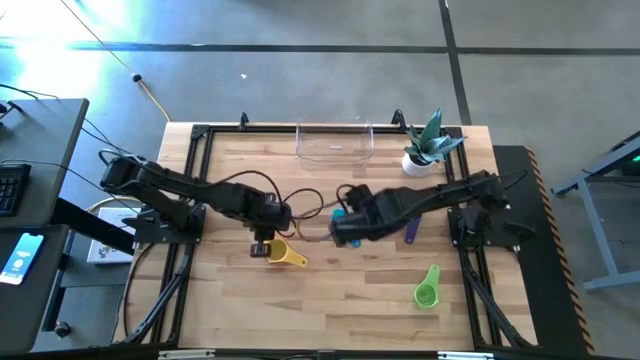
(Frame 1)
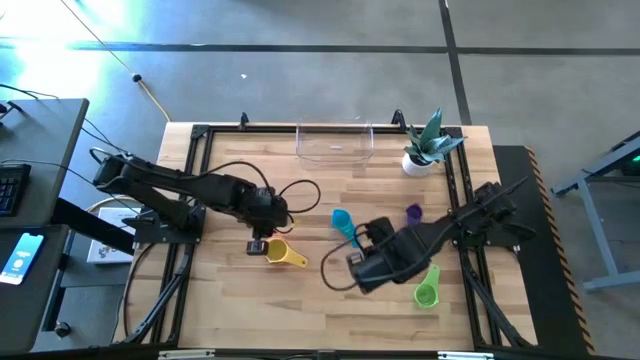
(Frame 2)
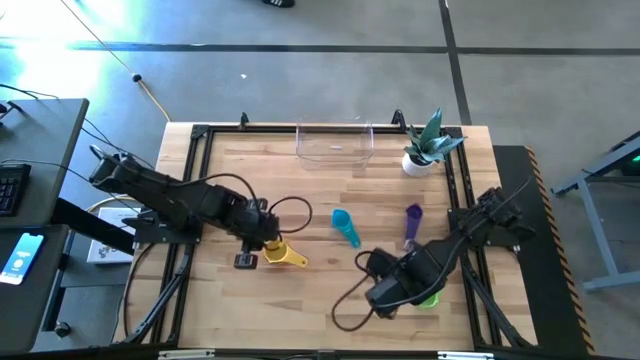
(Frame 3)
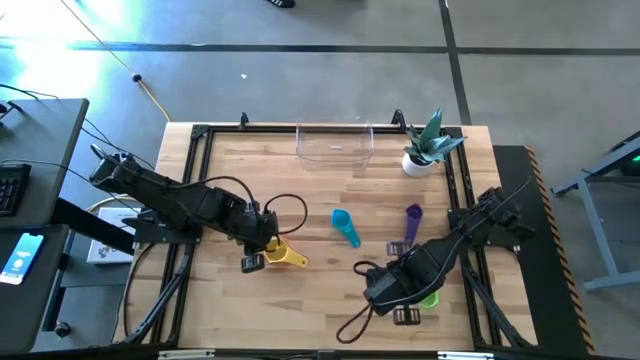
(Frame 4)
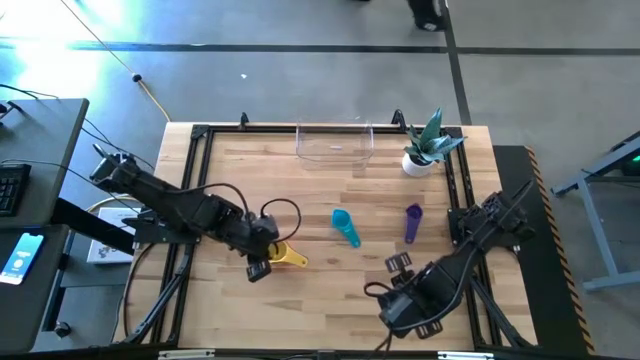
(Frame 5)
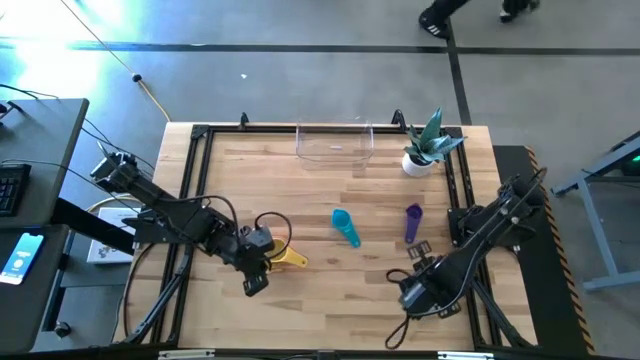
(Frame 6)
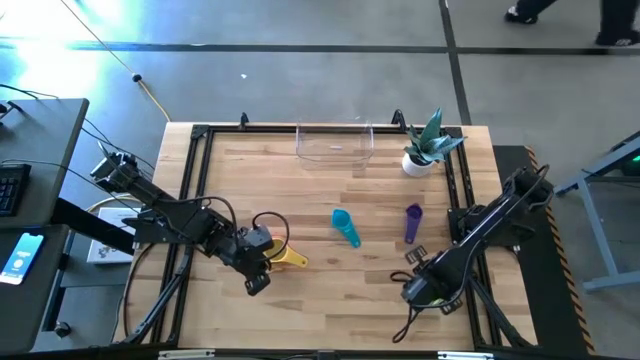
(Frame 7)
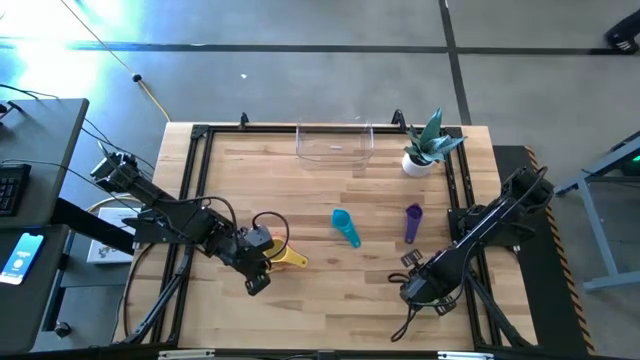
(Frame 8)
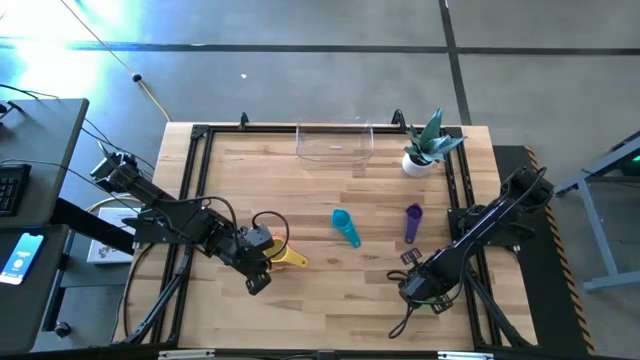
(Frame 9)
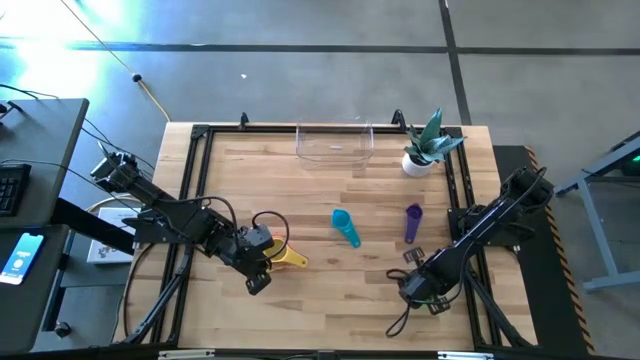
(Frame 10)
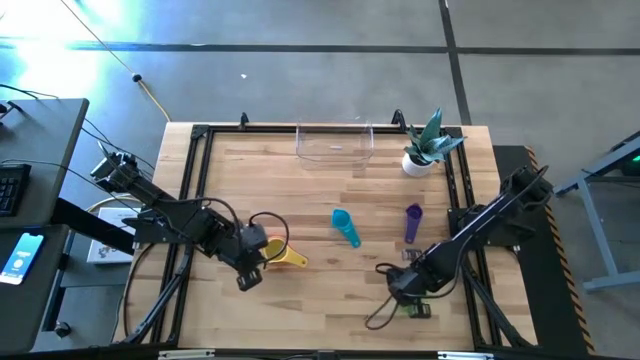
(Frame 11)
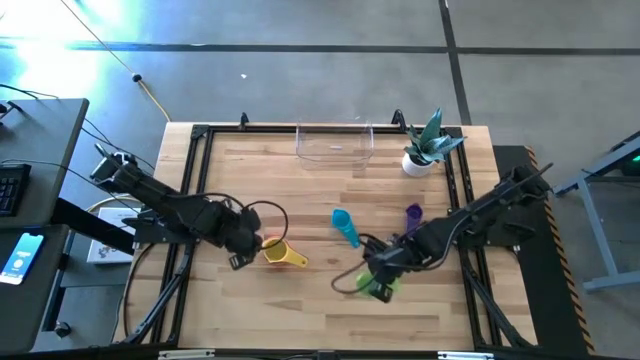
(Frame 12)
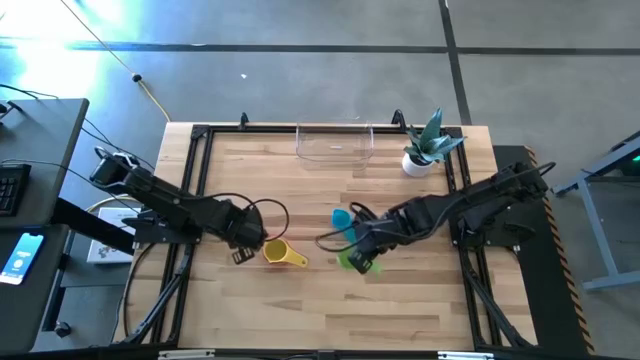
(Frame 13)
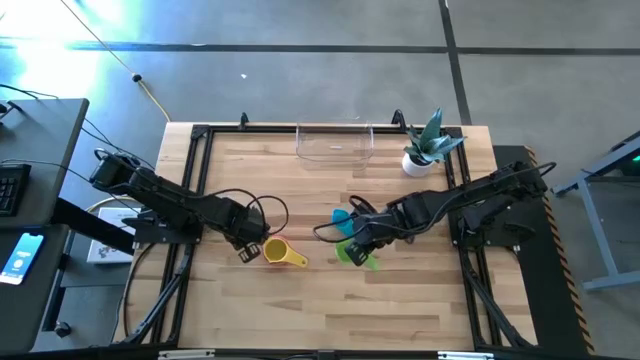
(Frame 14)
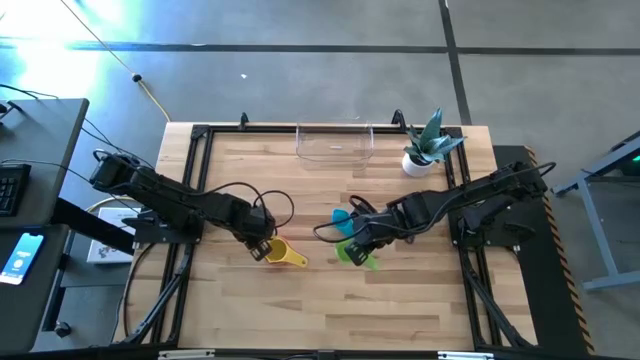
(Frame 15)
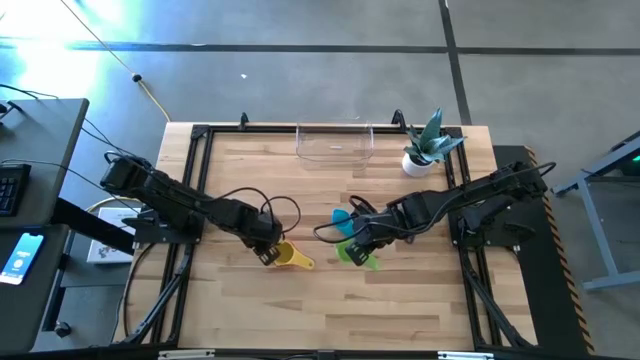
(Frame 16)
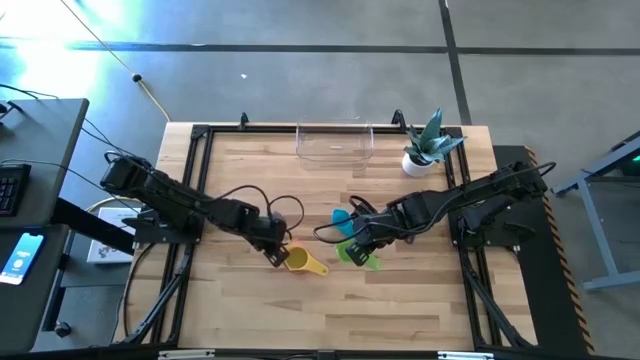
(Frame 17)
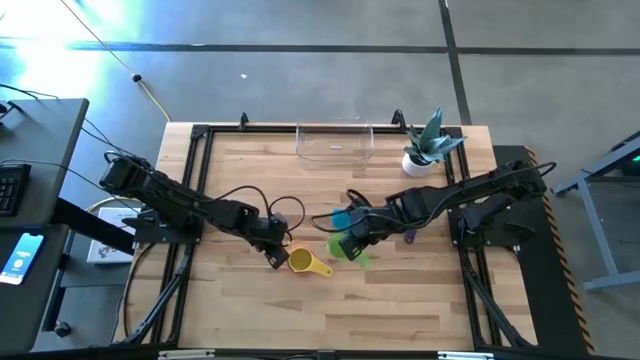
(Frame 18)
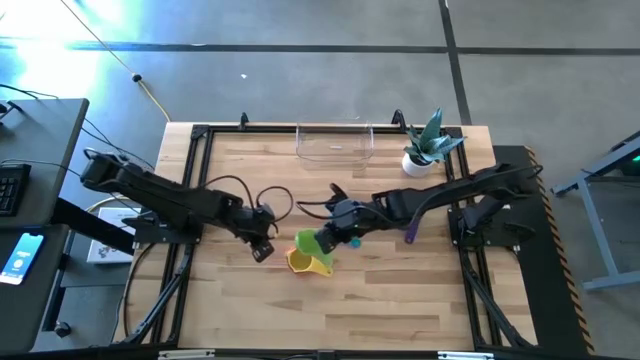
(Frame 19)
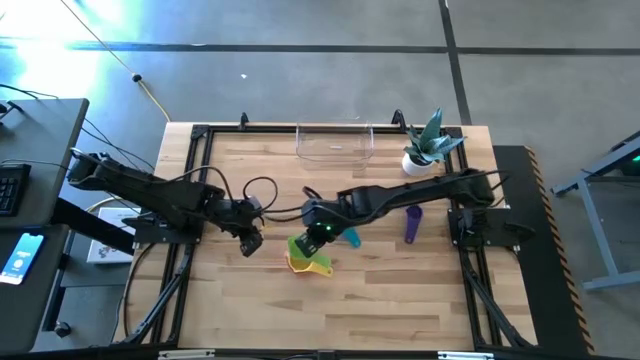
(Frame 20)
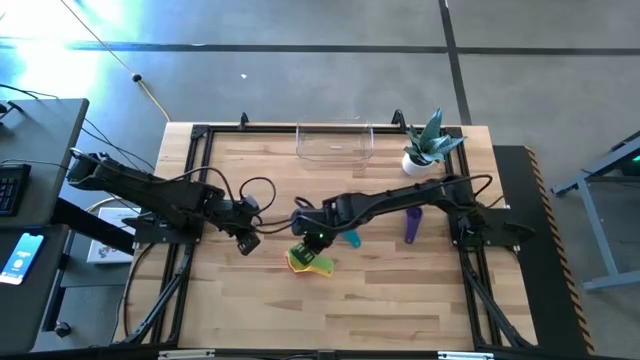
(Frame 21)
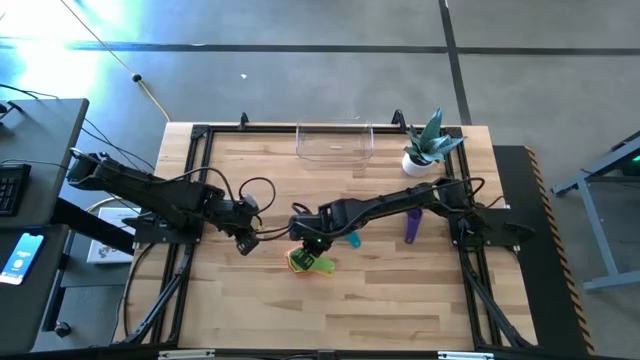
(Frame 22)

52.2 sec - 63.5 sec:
Task: Nest measuring cups in basket
Stack the green measuring cup on top of the yellow measuring cup

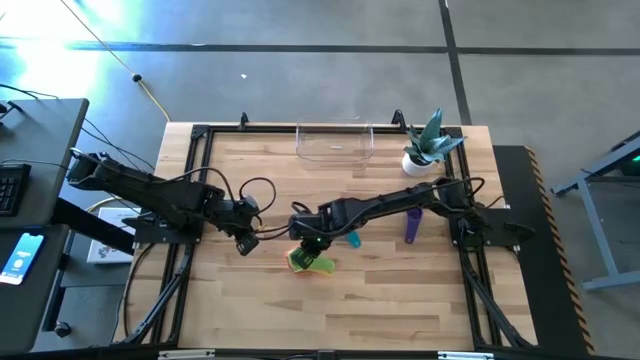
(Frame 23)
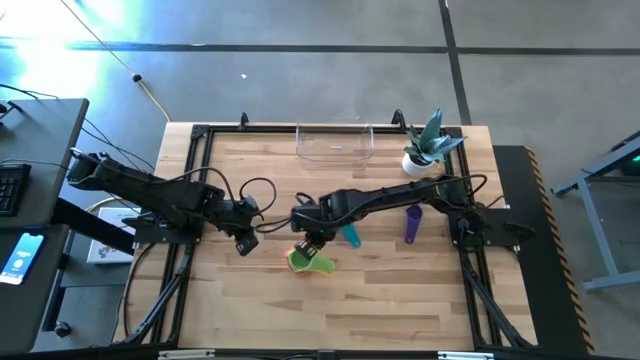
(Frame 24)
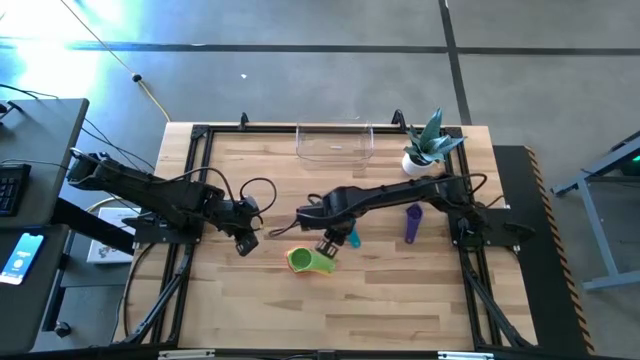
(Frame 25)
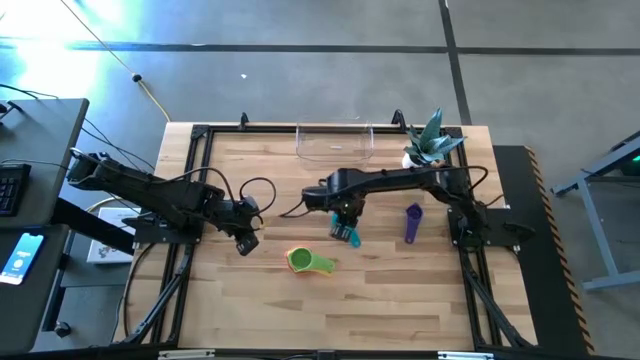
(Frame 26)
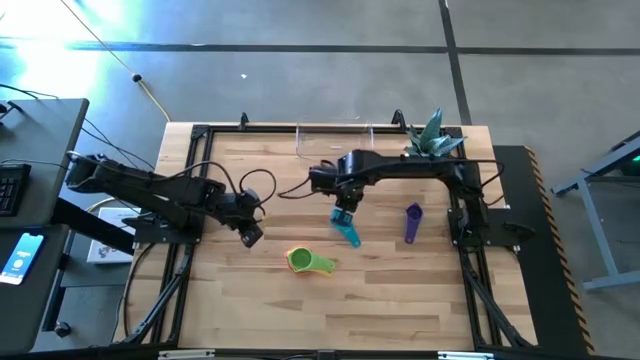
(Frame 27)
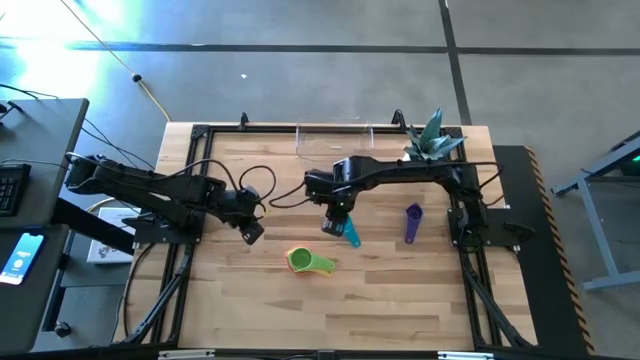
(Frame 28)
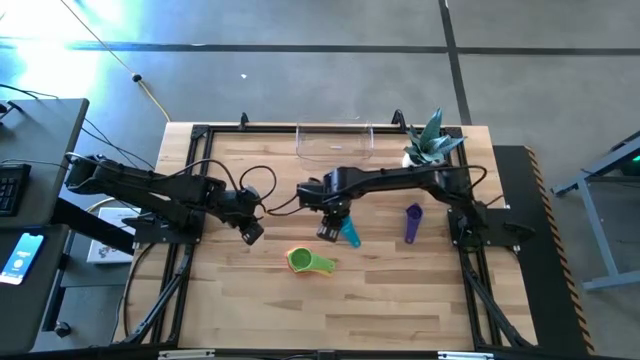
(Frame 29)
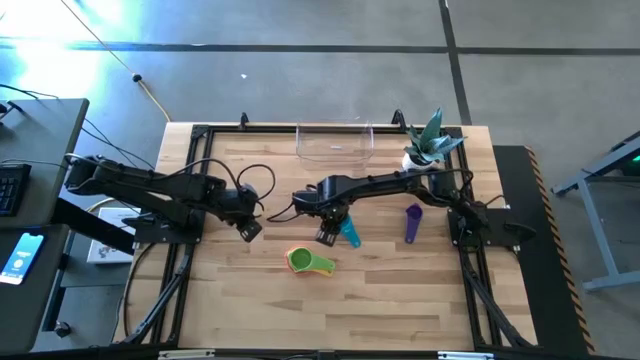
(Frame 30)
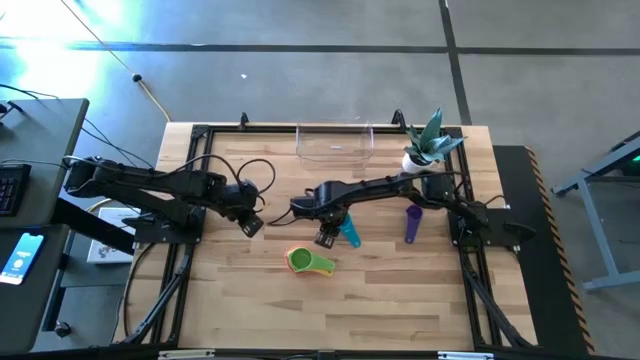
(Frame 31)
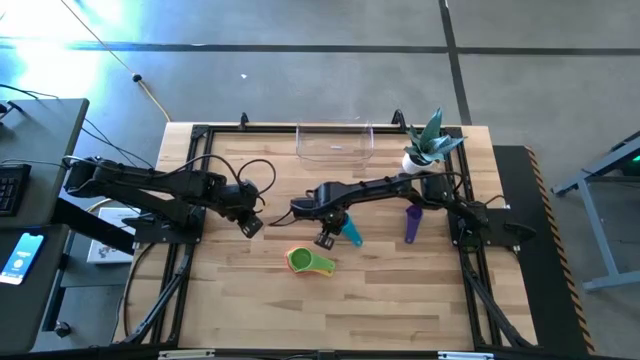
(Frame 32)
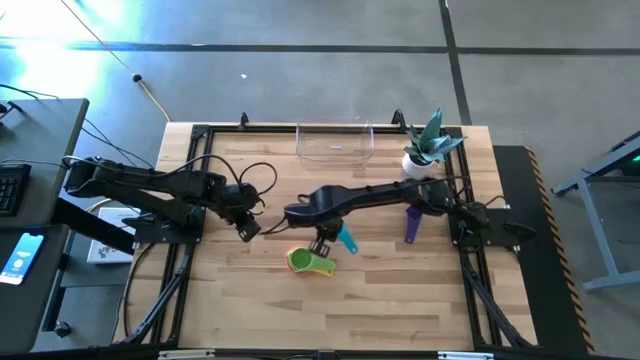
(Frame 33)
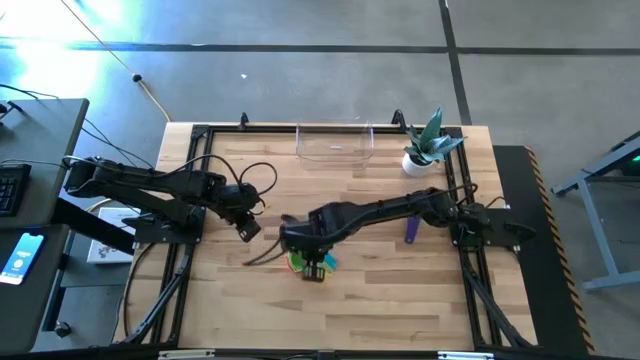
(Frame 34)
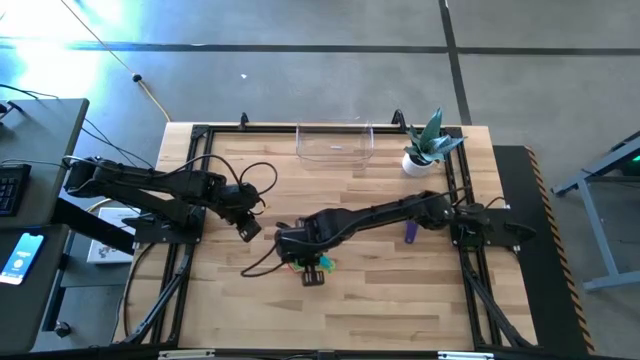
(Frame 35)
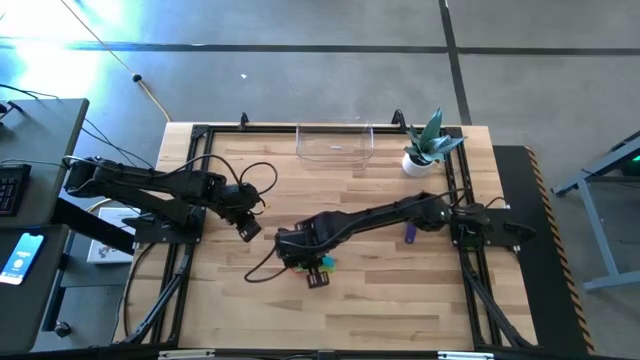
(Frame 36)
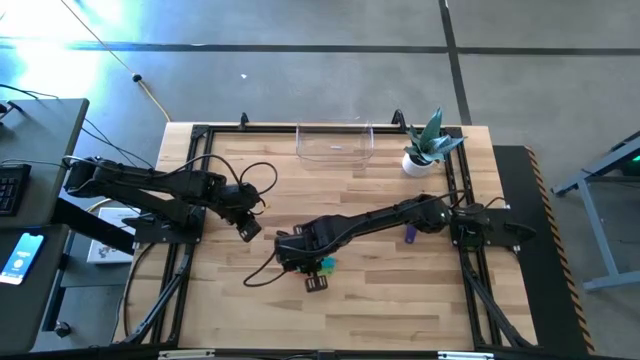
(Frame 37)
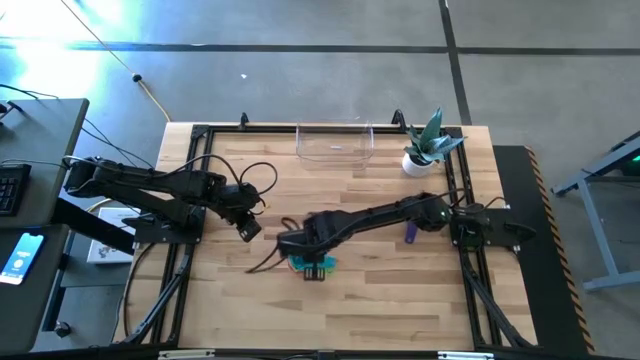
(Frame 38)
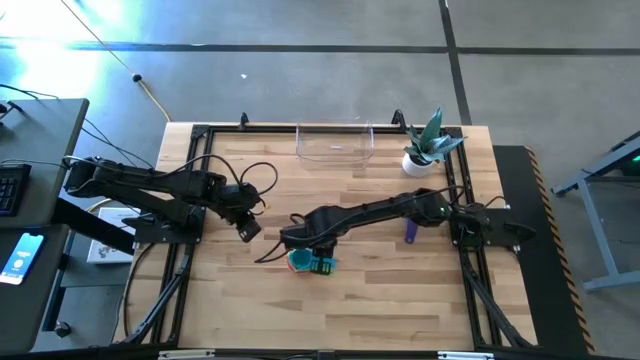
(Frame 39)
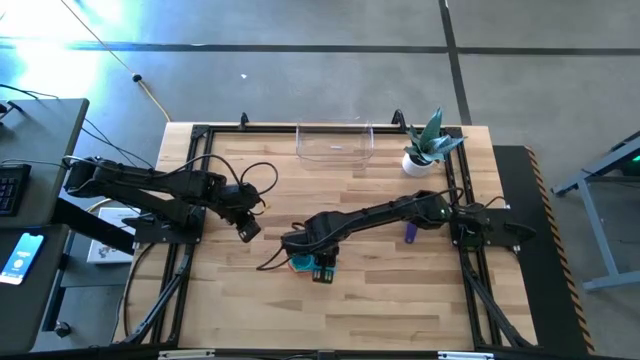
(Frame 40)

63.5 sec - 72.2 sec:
Stack the light blue measuring cup on top of the green measuring cup

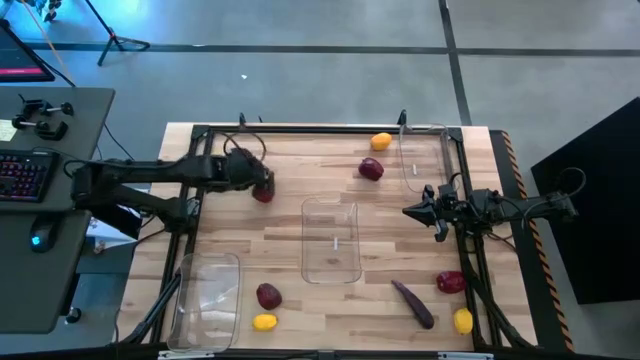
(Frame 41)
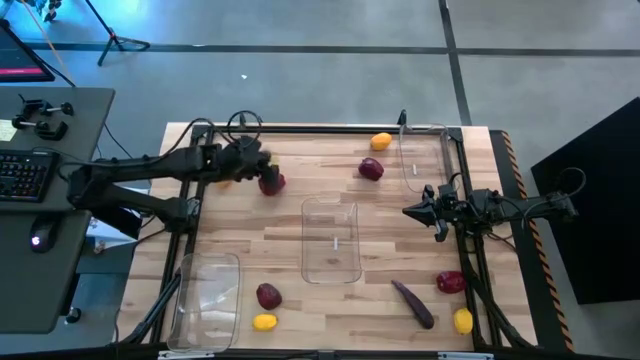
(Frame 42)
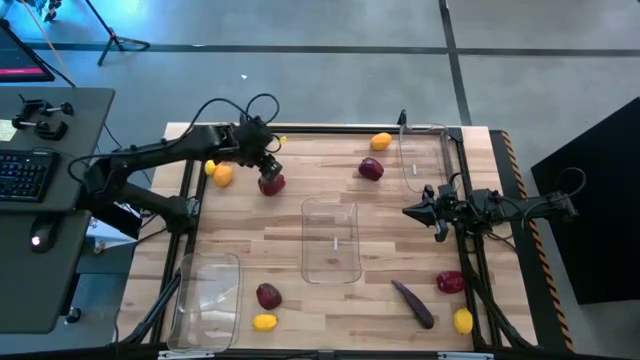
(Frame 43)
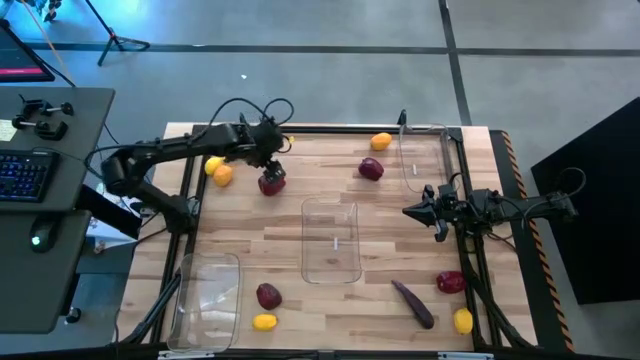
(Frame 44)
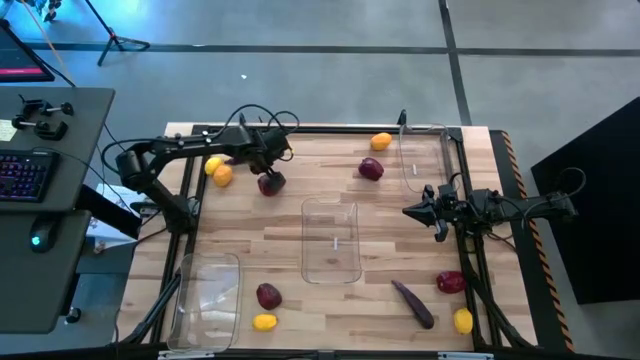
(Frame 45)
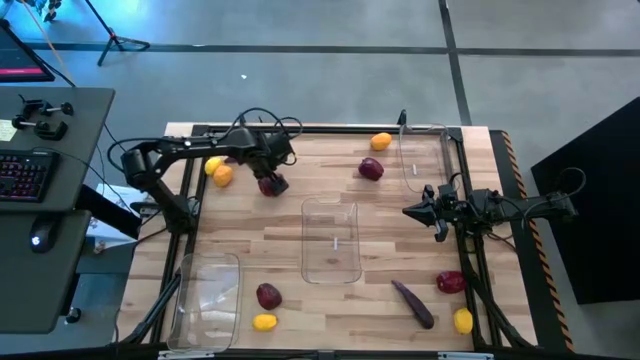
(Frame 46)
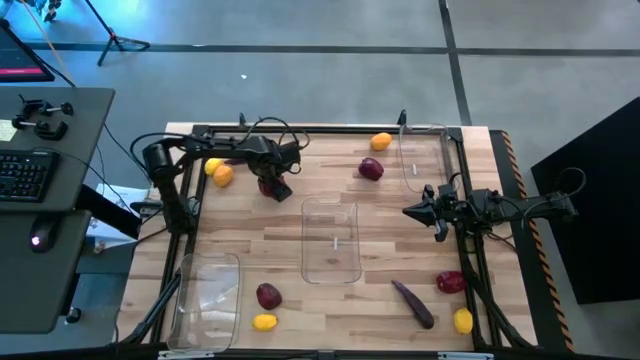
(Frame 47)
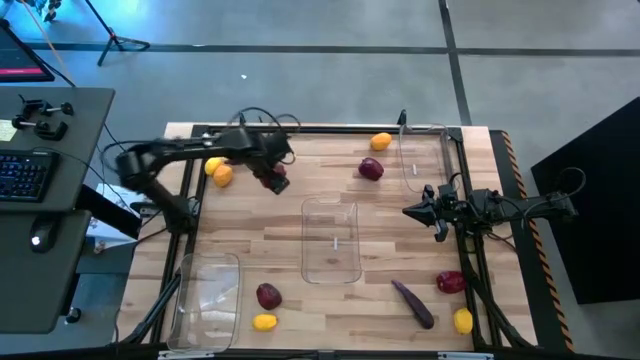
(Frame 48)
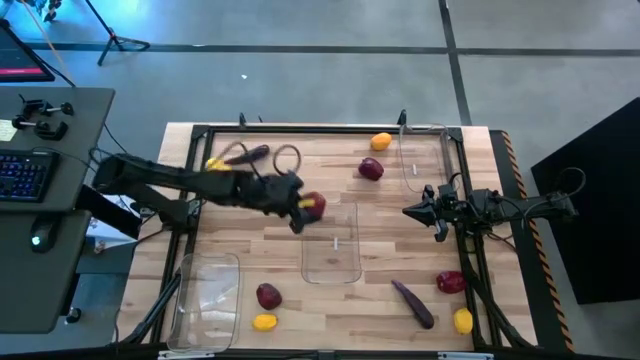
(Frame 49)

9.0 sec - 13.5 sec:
Task: Sort produce into baskets
Put the red apple into the middle transparent bin
